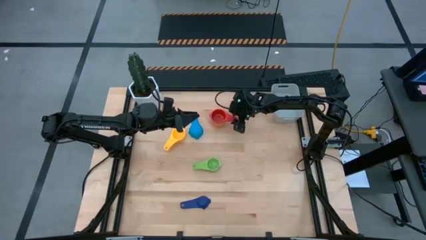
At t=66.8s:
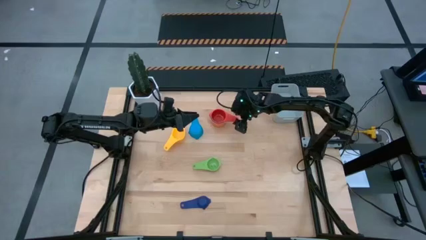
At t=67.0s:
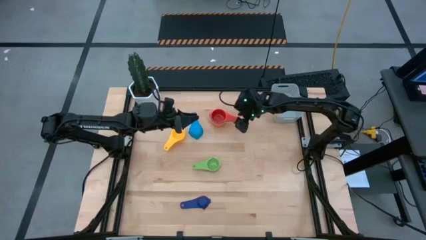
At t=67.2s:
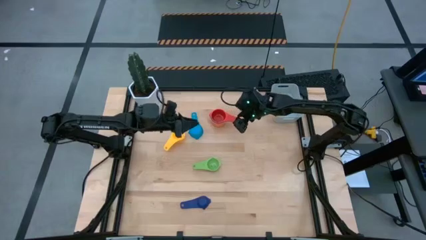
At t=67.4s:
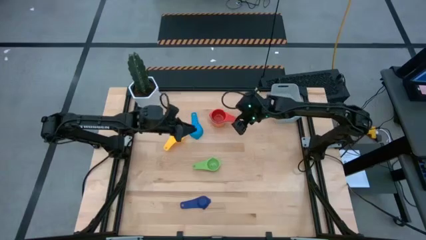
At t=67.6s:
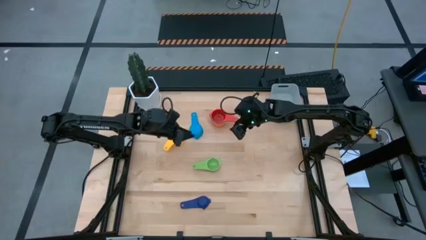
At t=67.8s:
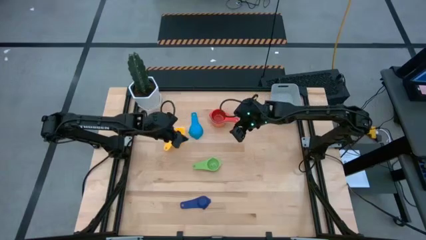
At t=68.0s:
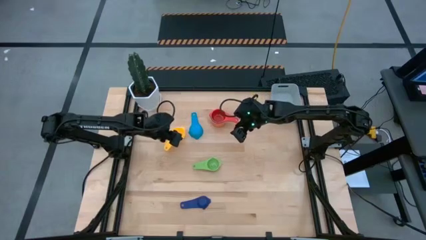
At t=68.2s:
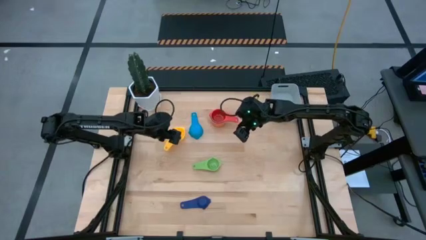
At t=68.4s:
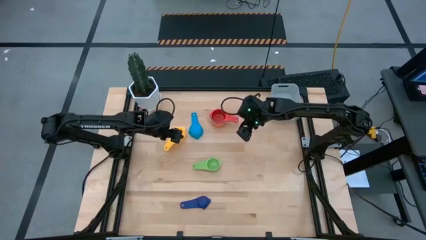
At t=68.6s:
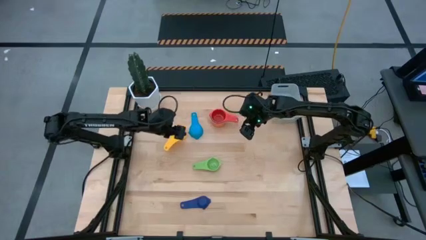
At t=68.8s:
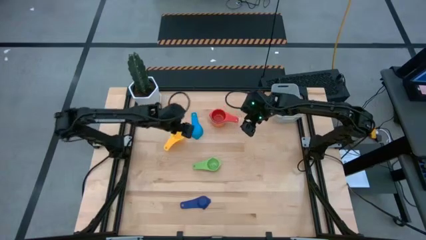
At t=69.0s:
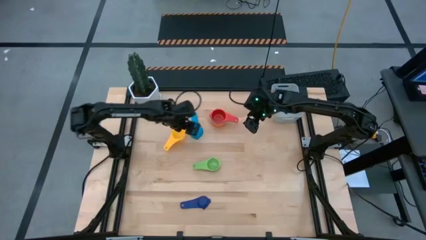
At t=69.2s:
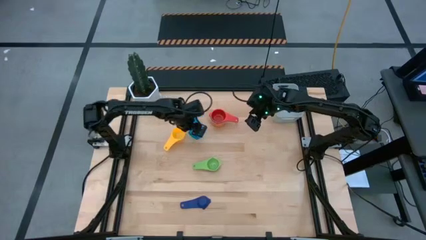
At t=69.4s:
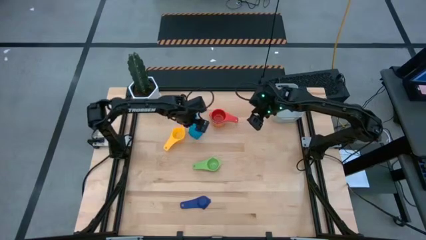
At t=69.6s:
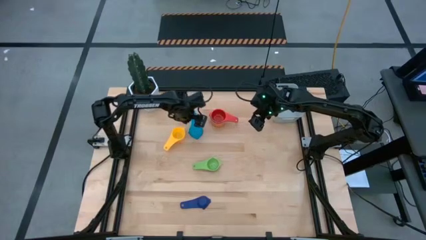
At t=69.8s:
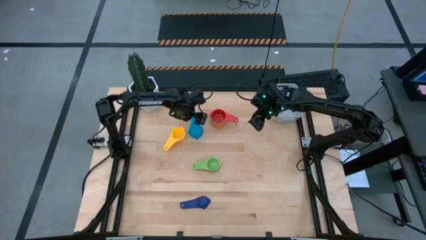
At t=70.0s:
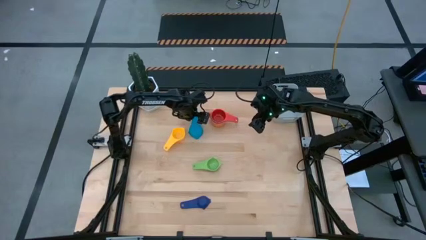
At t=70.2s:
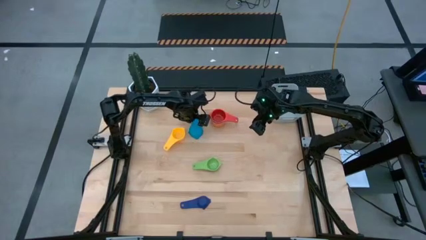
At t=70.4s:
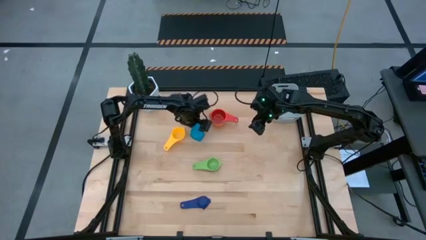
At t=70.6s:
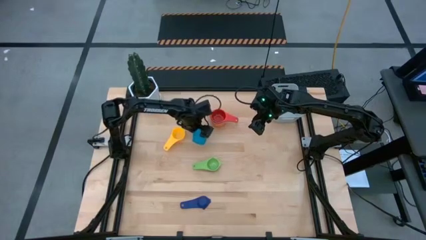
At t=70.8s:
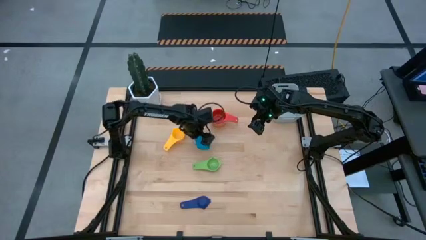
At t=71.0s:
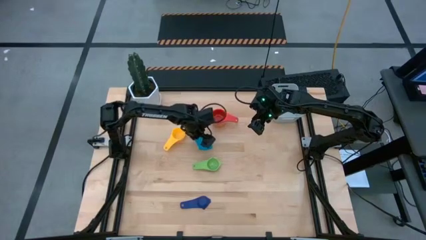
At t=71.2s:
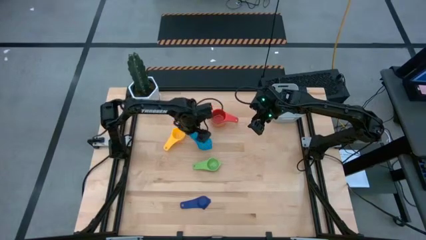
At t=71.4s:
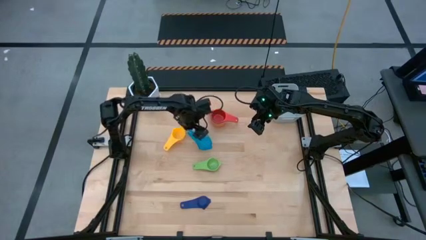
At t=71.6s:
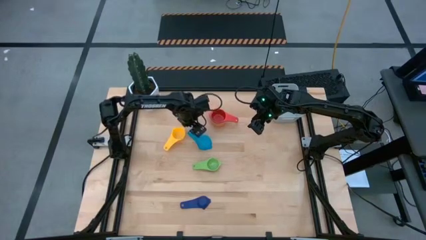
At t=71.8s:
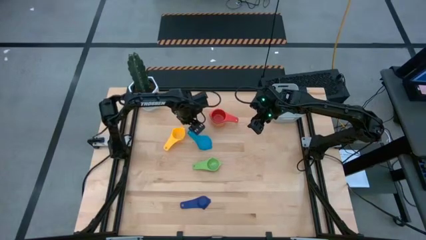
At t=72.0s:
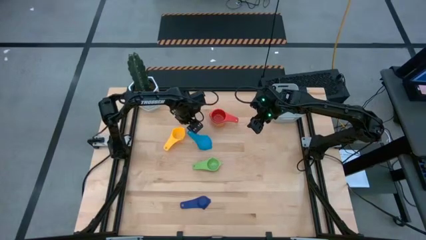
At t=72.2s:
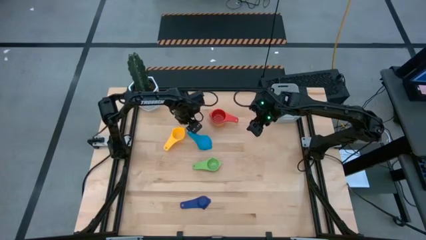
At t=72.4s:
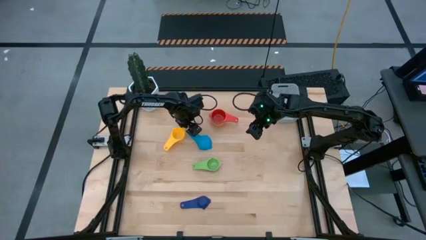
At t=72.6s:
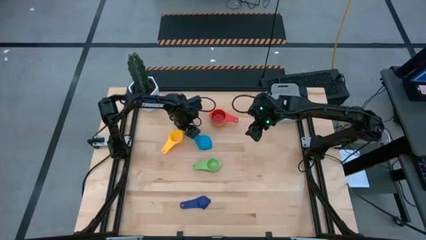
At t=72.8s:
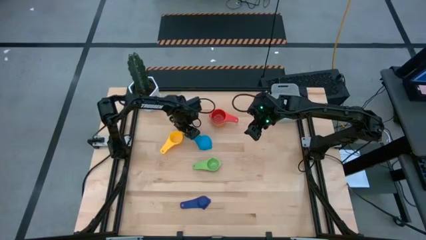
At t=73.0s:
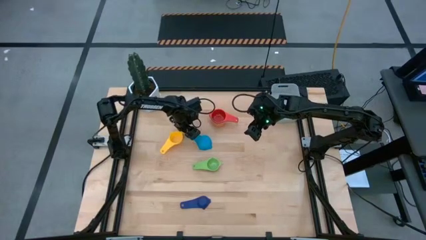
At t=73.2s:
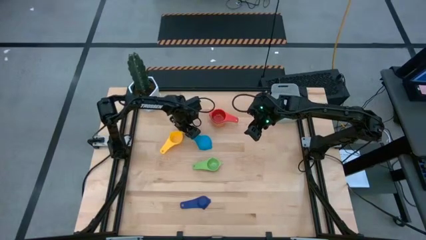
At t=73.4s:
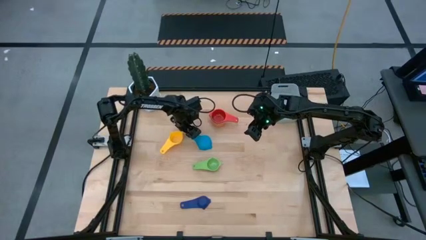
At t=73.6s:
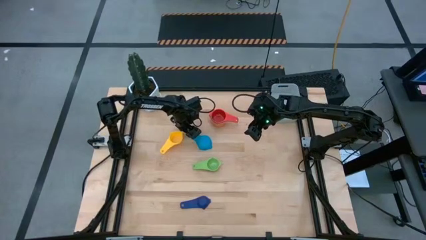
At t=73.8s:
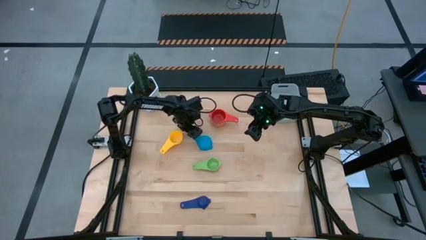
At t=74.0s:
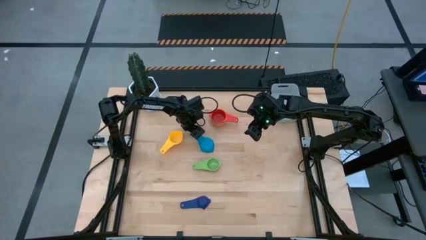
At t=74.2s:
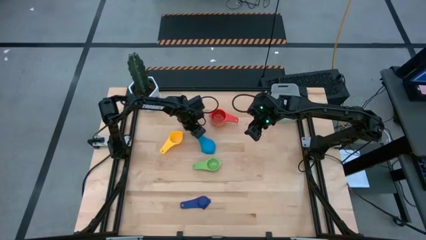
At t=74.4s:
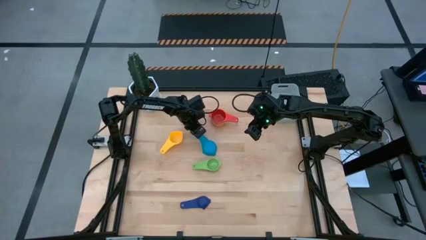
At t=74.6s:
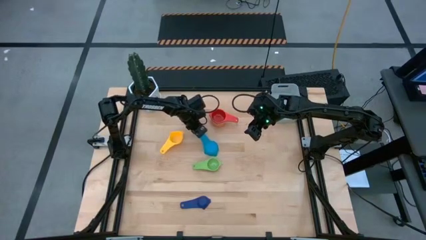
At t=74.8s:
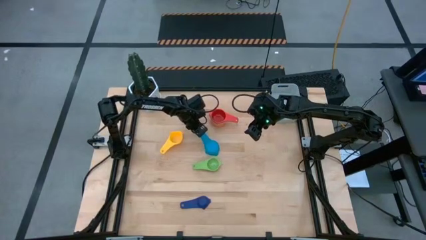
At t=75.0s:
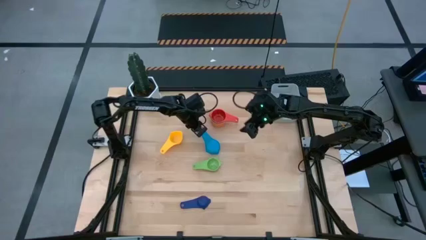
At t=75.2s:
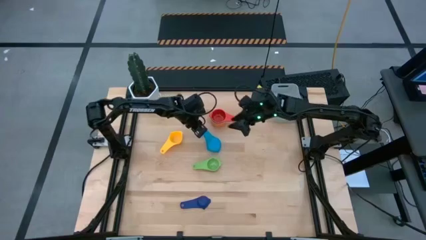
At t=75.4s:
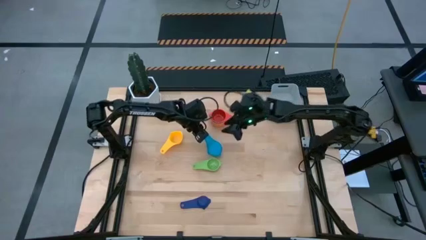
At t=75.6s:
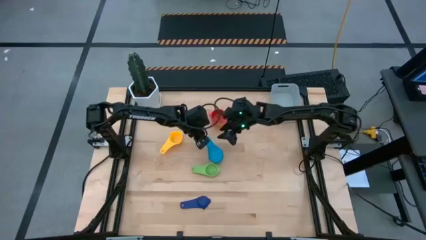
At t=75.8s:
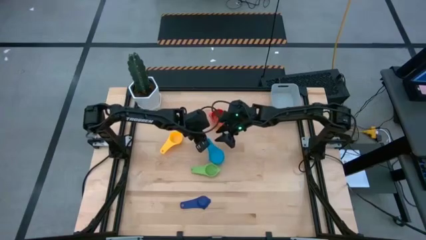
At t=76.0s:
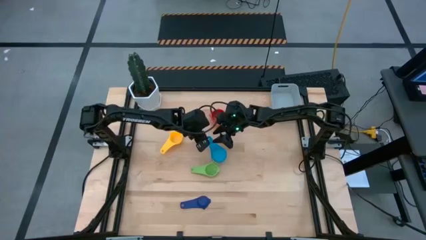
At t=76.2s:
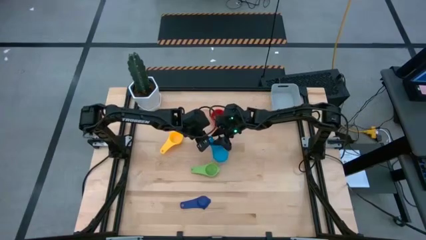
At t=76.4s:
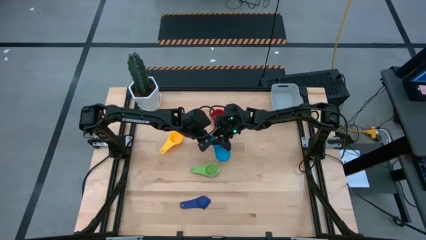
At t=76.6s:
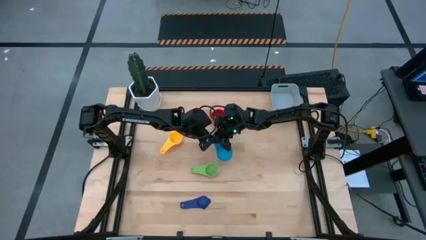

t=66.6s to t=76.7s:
Task: Nest measuring cups in basket
Stack the light blue measuring cup on top of the red measuring cup

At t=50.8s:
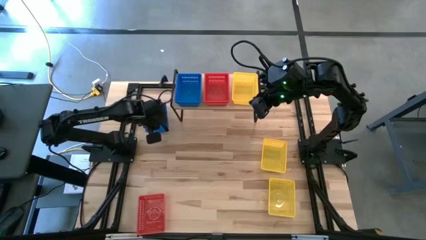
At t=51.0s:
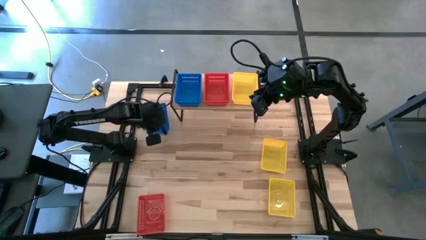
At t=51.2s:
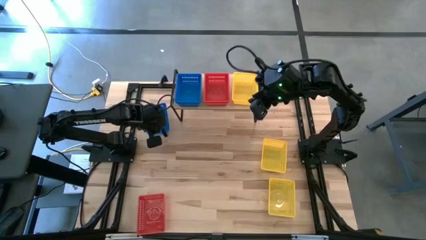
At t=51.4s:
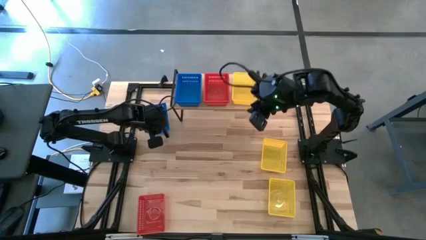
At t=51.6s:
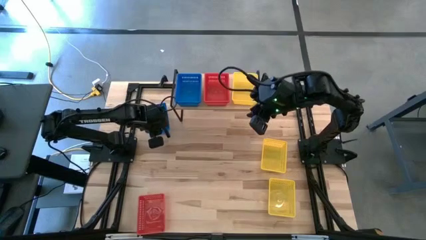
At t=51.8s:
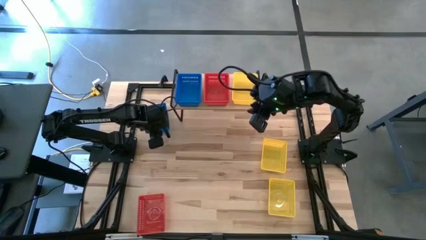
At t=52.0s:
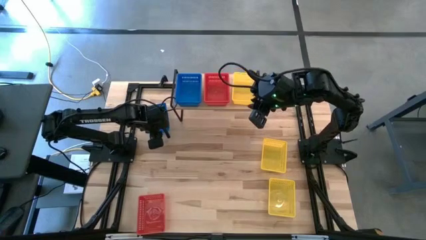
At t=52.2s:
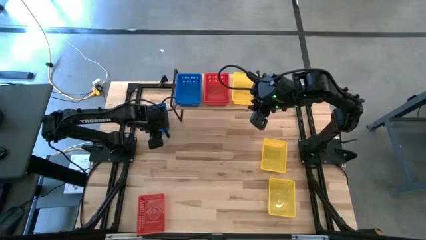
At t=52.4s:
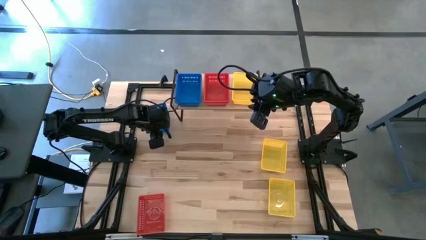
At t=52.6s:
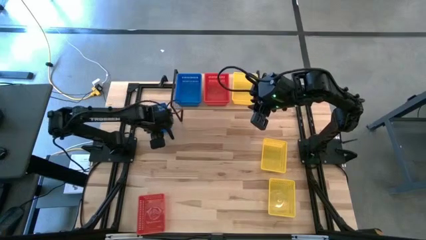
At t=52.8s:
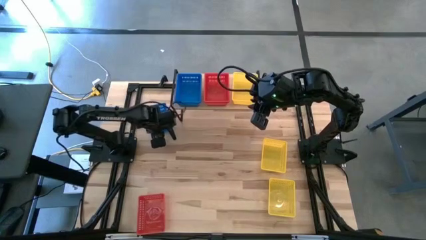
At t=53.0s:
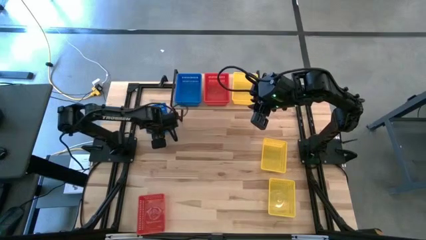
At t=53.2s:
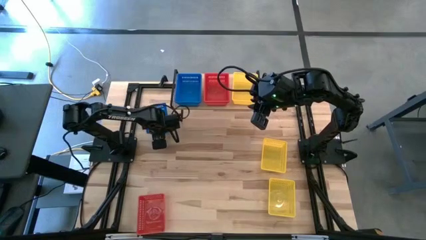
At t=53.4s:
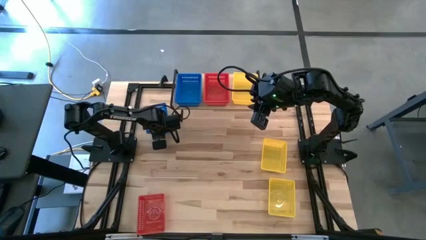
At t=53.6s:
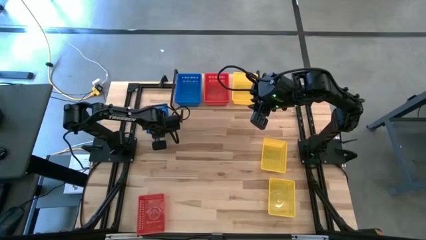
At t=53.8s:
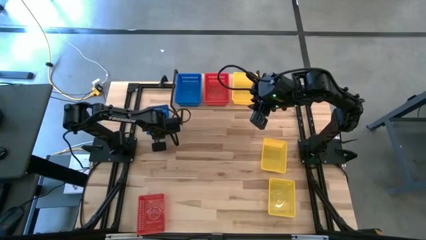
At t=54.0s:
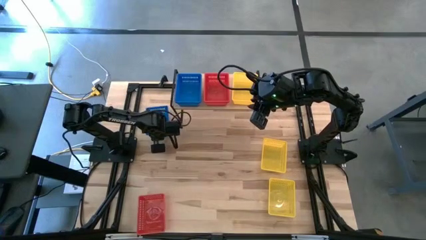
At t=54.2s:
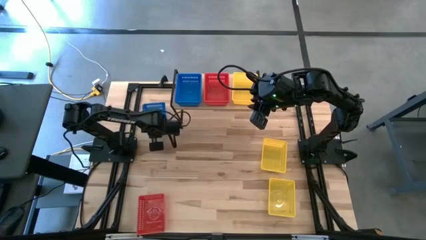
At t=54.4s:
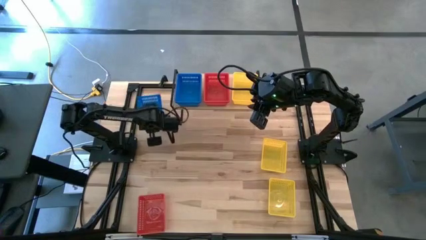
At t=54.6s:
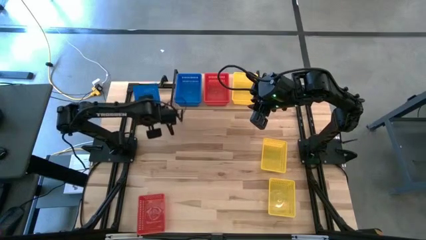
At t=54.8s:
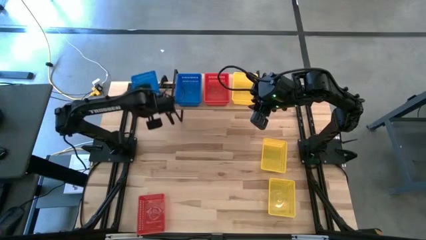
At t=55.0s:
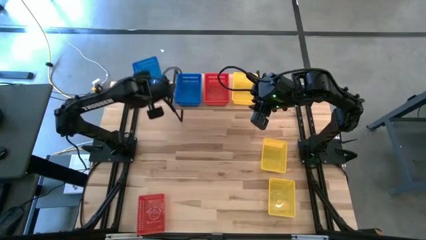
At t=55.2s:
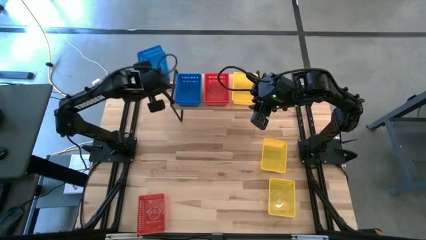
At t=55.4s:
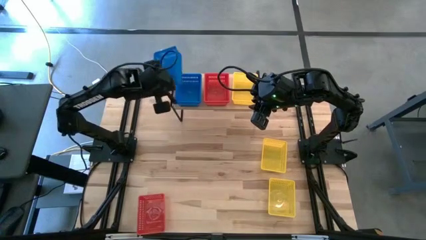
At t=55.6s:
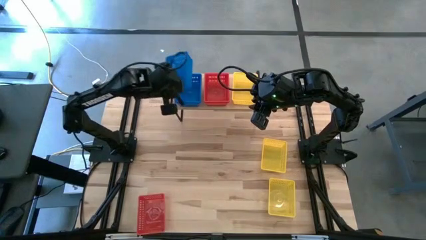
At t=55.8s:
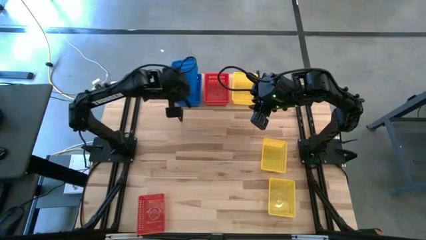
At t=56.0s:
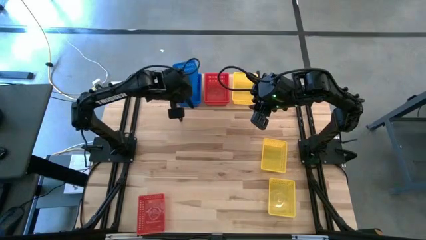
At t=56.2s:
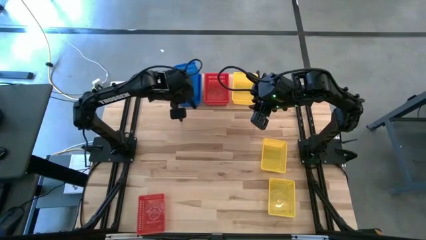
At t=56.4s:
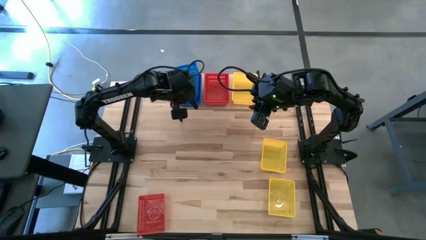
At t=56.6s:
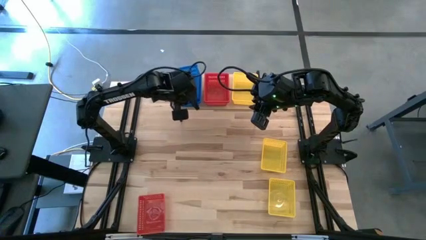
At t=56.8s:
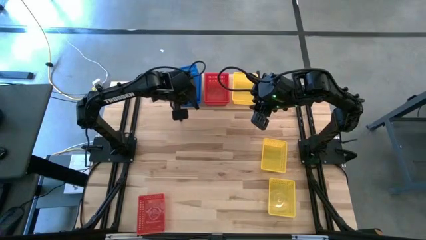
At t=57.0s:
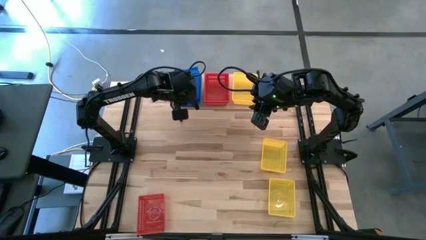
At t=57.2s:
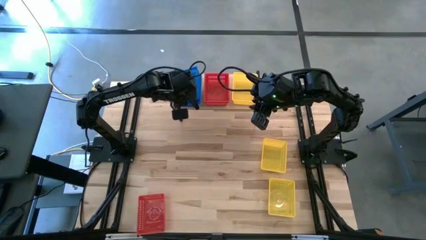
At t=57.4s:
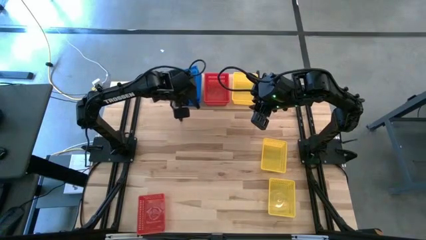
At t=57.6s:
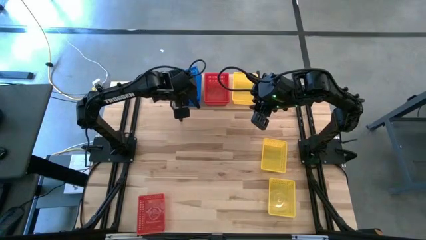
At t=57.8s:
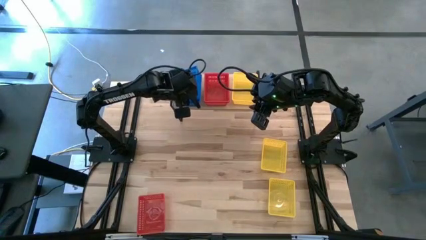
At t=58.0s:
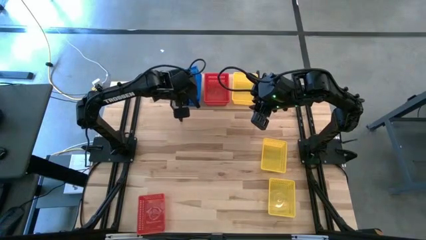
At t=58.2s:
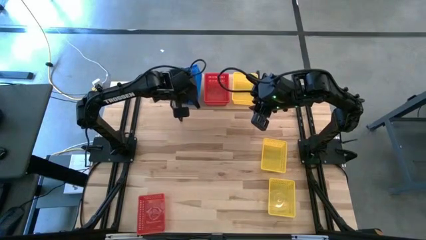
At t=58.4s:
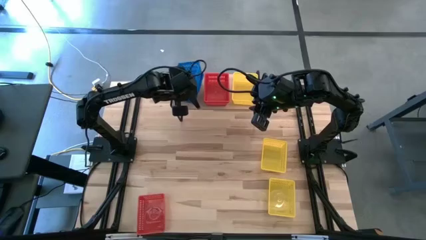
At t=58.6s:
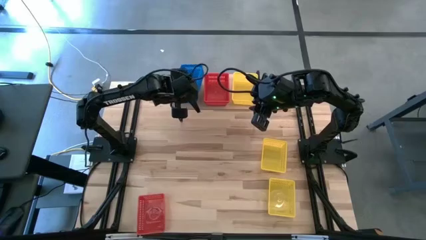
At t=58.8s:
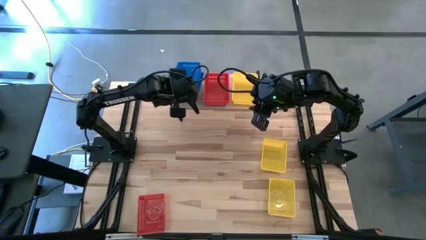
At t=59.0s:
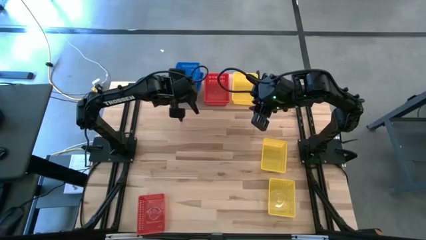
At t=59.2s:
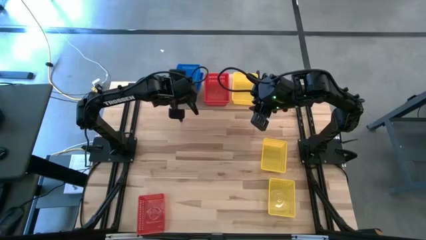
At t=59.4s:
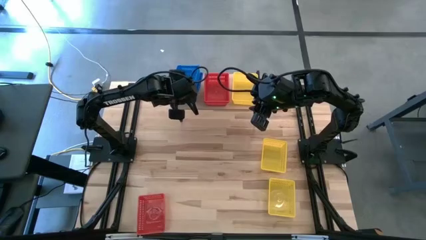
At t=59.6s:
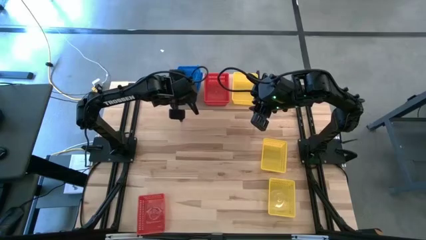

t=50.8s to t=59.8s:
Task: Stack baskets on shelf by color
Stack the blue bin on top of the blue bin on the shelf
